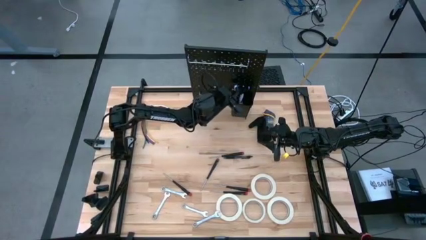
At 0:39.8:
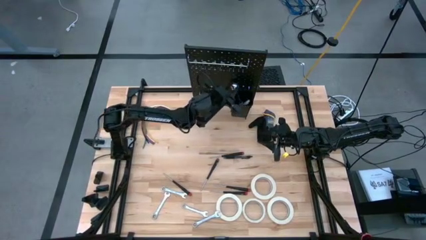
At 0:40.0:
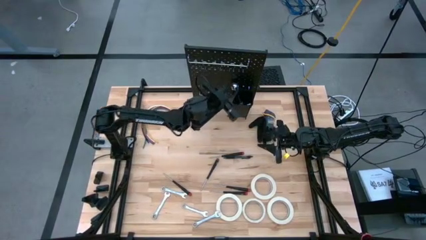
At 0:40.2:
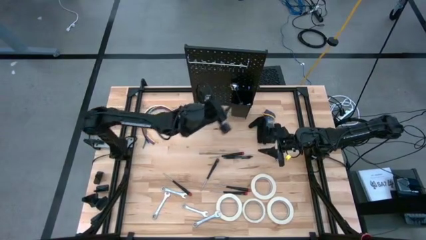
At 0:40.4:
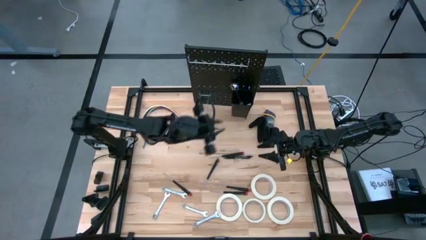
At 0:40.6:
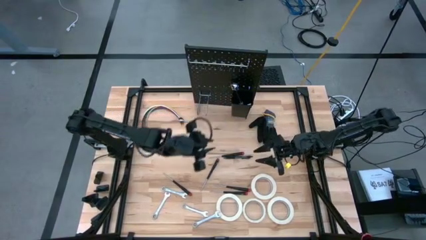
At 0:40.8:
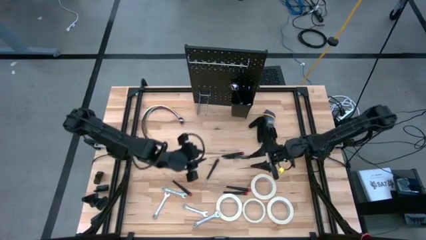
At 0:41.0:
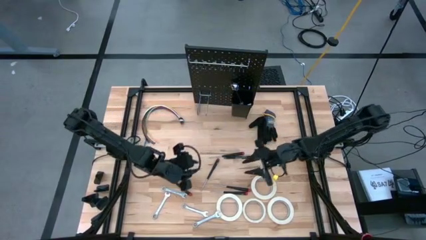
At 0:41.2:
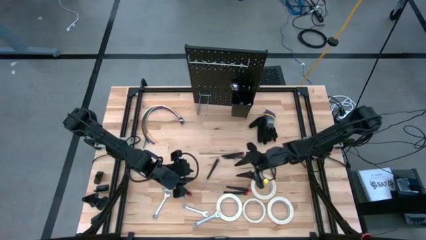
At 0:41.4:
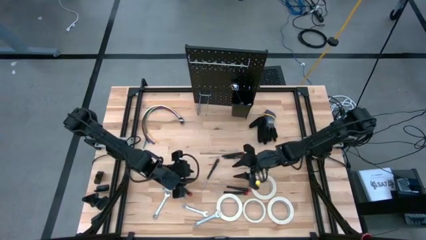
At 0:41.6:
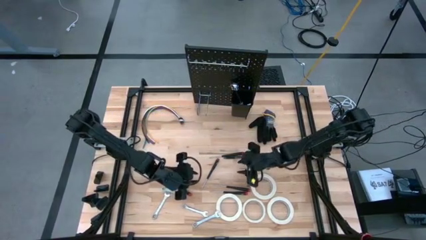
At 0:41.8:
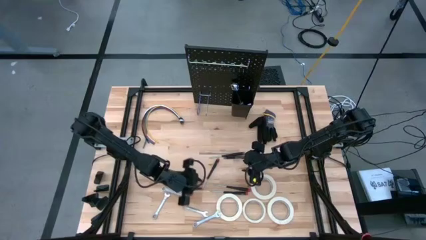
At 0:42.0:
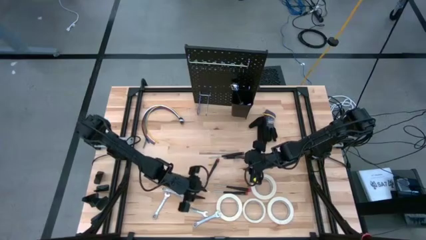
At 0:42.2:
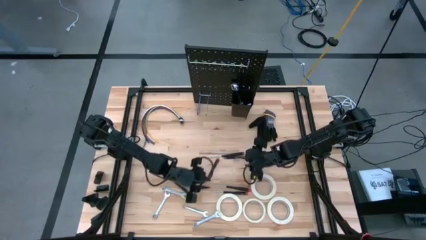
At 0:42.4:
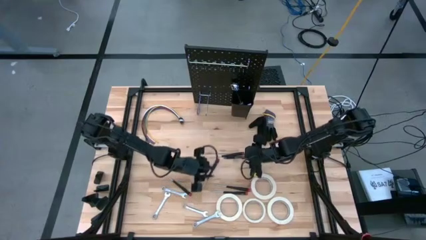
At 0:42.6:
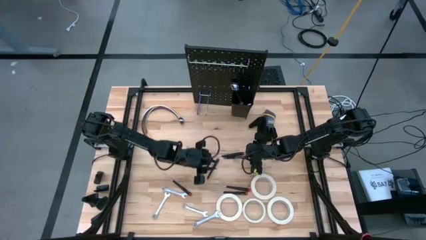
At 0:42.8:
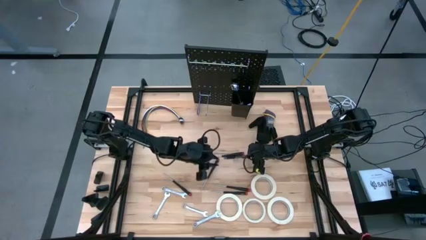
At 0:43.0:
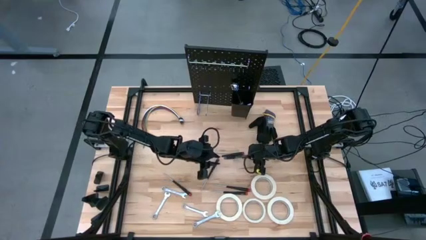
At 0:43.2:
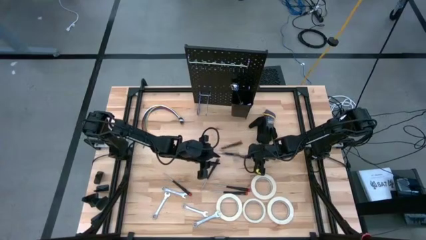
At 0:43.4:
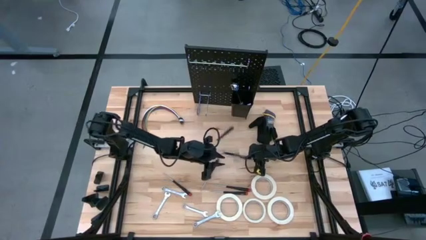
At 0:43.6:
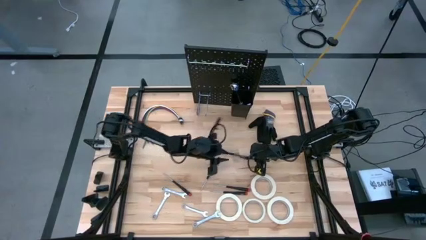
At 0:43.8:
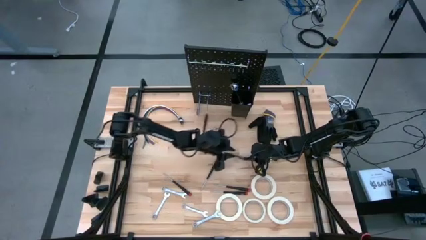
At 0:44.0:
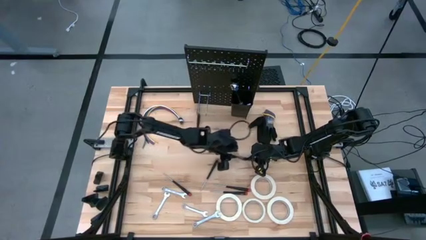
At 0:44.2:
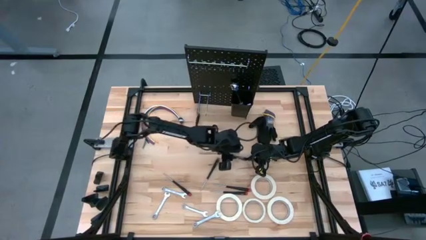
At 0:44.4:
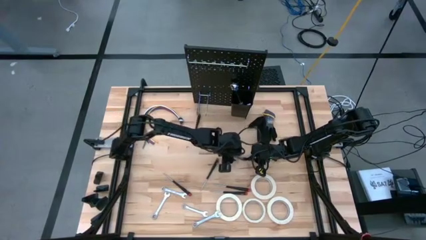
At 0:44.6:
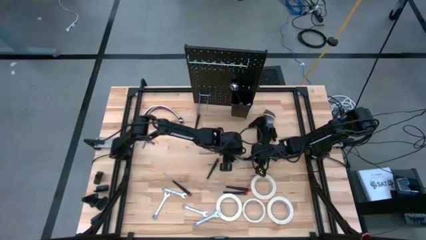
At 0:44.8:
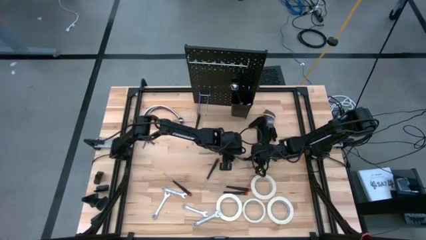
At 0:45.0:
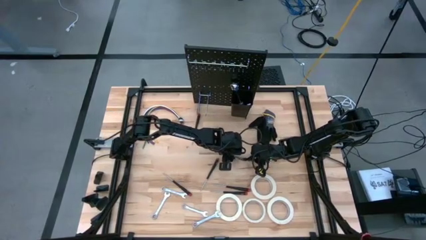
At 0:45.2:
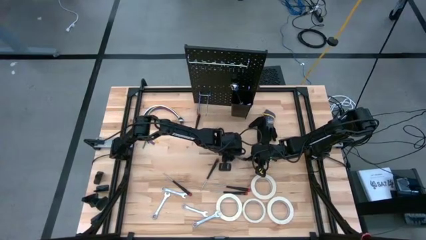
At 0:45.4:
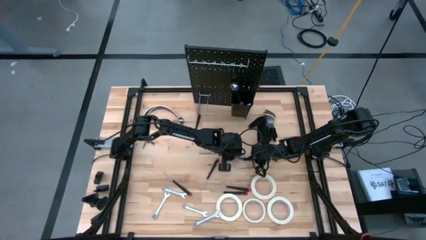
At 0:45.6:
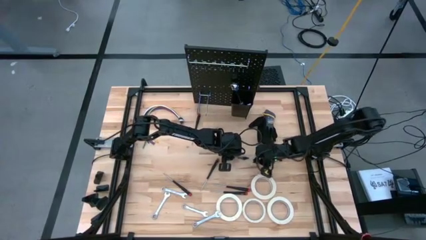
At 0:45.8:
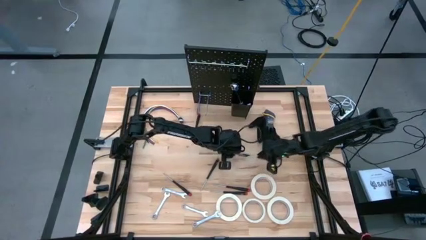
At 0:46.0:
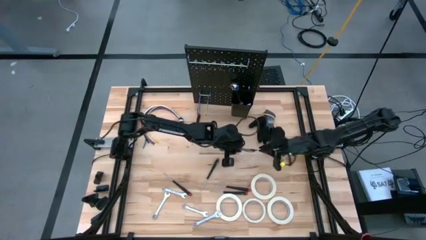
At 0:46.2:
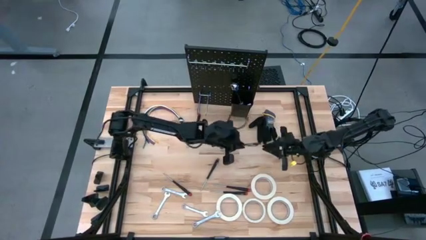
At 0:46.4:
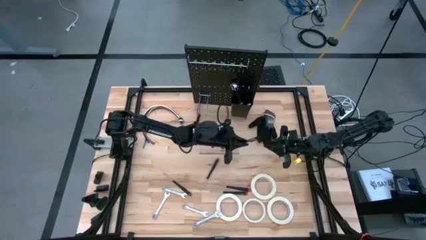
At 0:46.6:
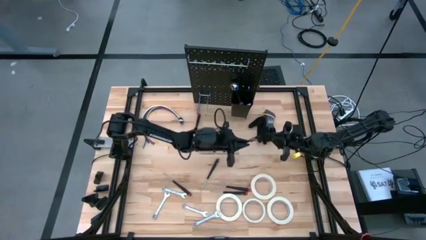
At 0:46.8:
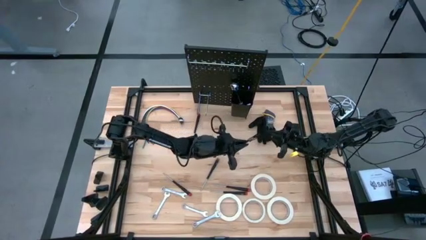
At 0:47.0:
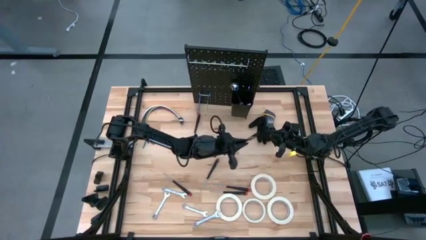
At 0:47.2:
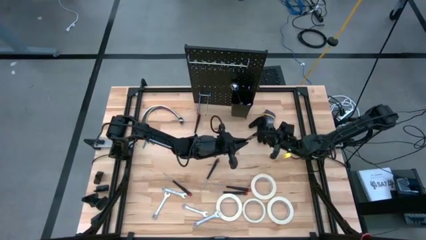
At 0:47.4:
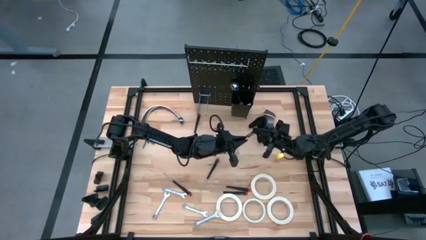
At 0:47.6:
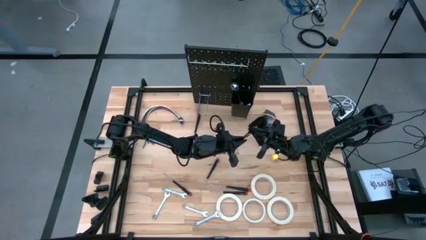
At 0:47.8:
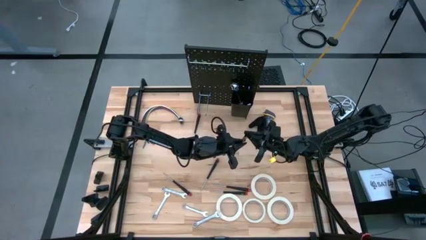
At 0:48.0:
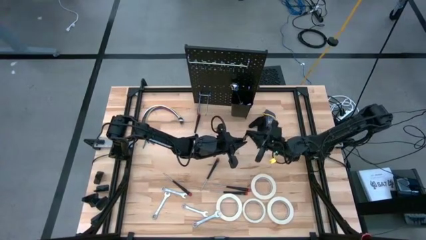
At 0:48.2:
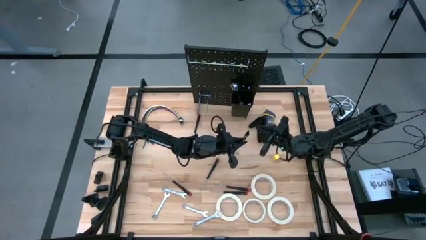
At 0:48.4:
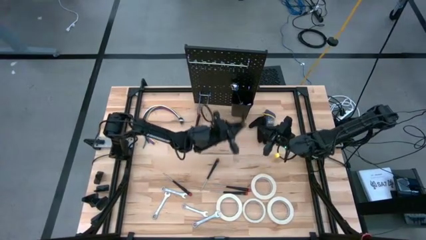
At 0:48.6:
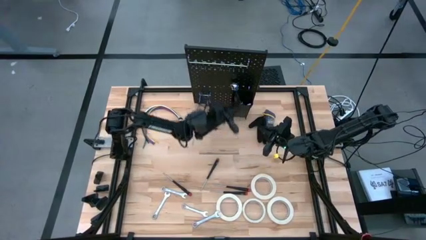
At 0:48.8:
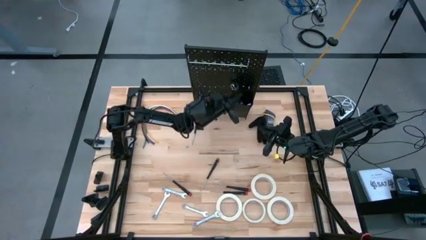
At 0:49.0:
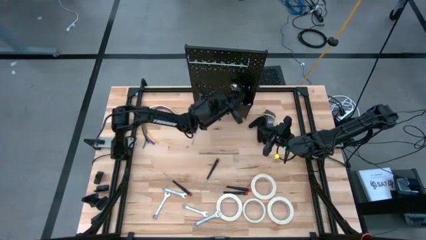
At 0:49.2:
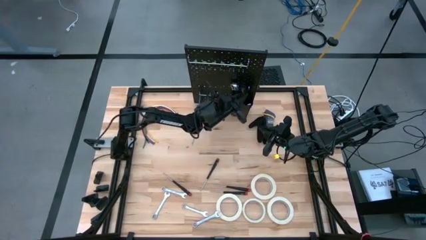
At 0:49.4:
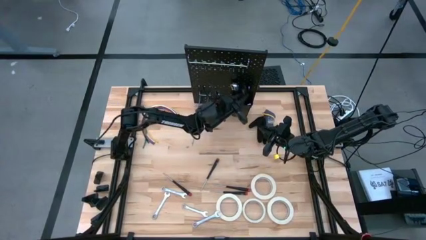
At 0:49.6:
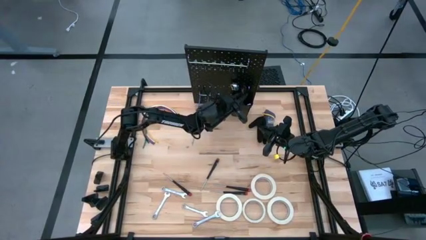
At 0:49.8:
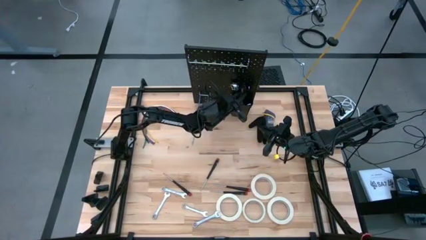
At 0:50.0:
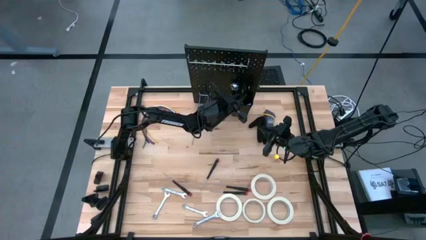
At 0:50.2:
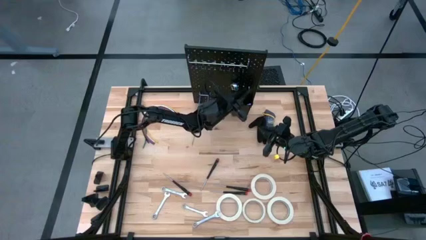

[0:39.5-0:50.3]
Task: Hang tools onto peg board
Put the black pen into the black bin on the peg board

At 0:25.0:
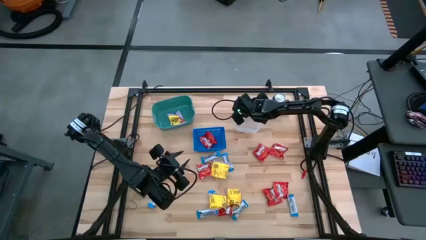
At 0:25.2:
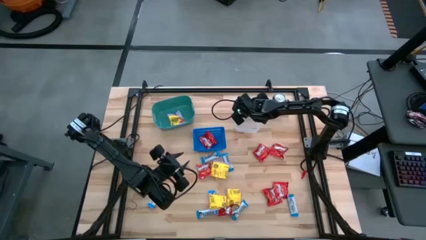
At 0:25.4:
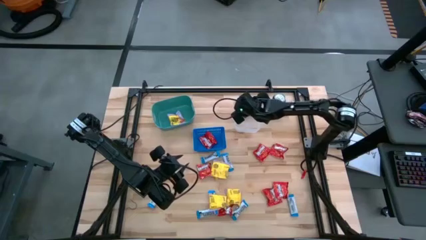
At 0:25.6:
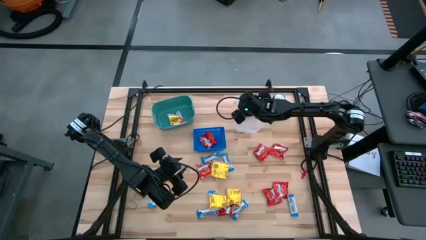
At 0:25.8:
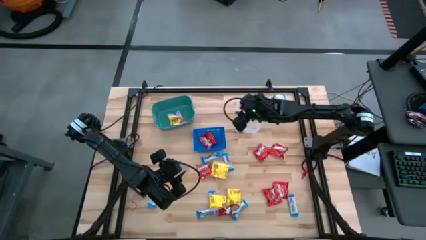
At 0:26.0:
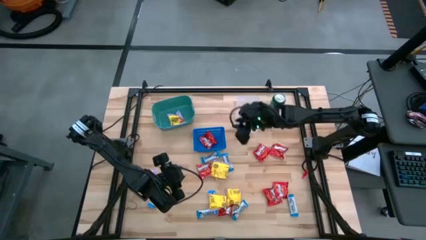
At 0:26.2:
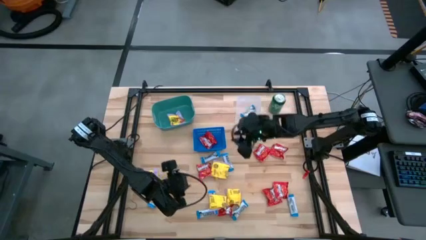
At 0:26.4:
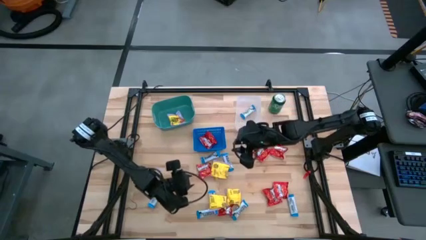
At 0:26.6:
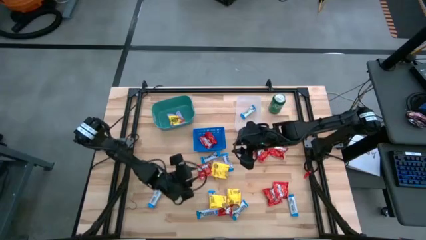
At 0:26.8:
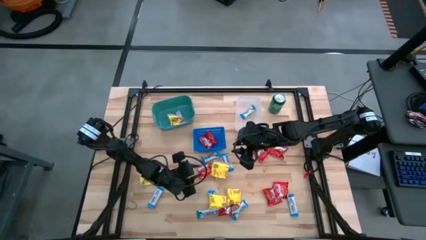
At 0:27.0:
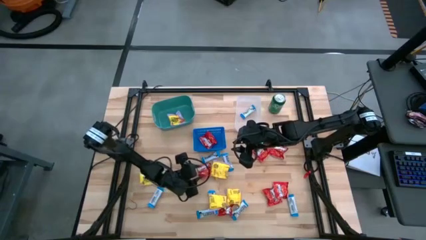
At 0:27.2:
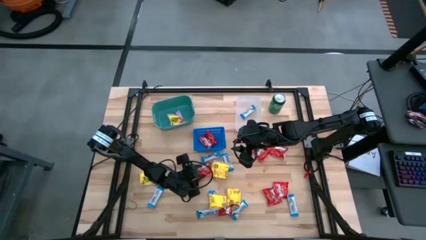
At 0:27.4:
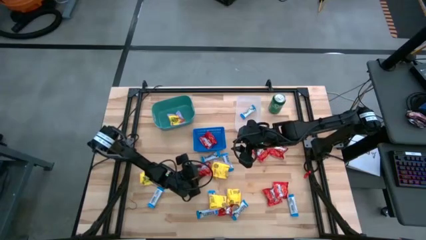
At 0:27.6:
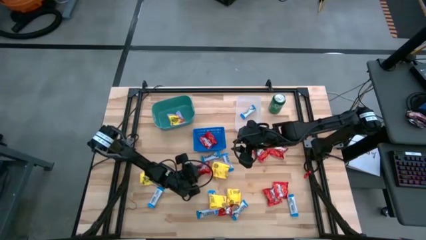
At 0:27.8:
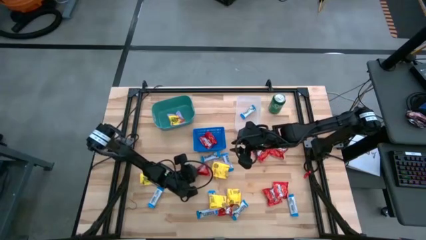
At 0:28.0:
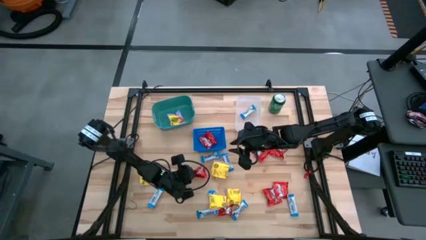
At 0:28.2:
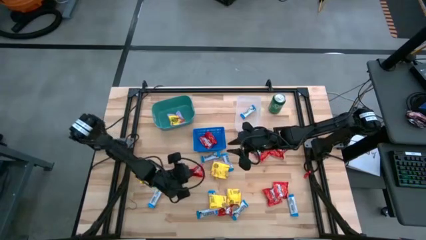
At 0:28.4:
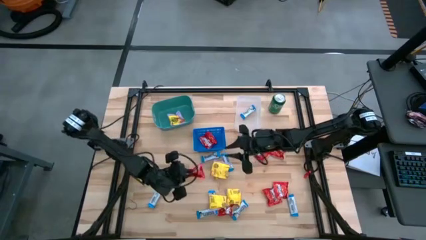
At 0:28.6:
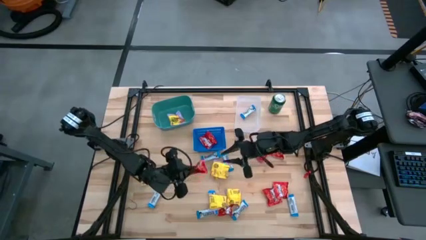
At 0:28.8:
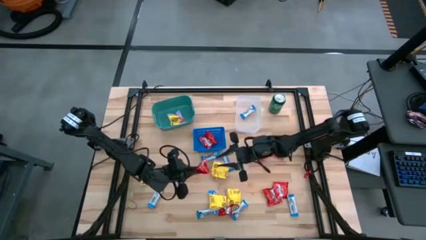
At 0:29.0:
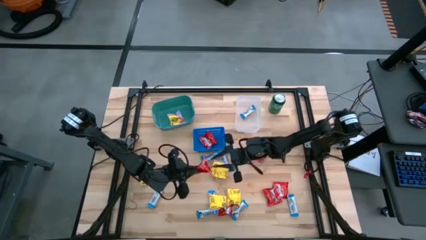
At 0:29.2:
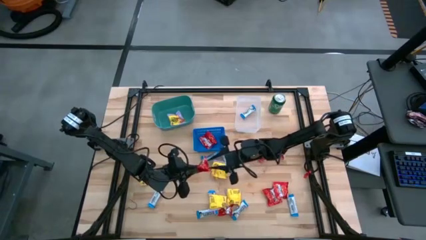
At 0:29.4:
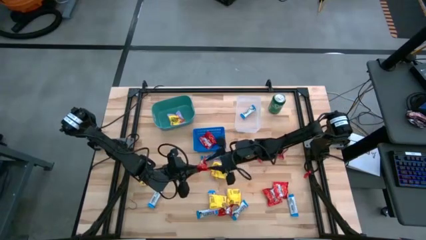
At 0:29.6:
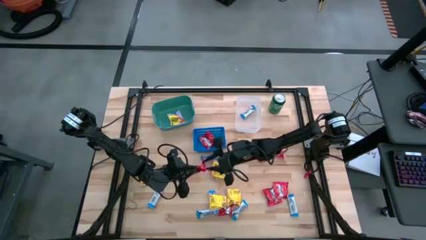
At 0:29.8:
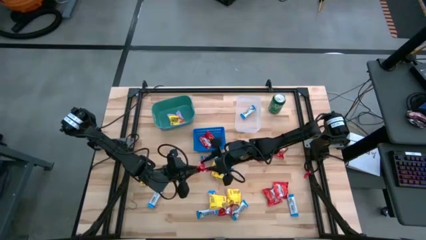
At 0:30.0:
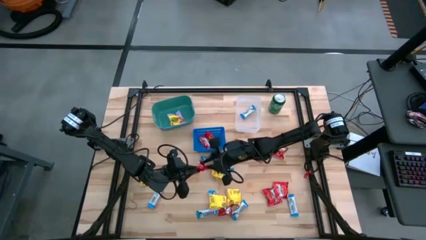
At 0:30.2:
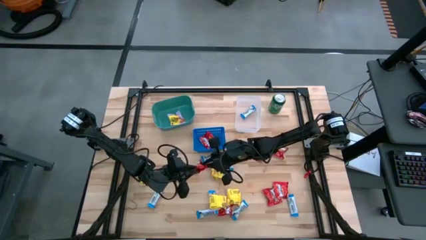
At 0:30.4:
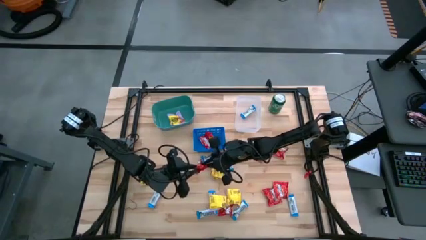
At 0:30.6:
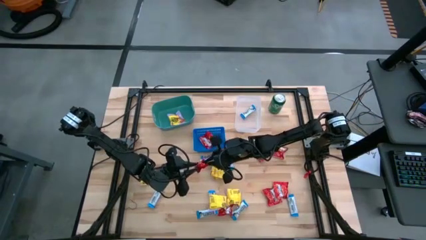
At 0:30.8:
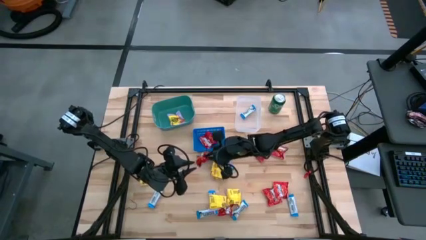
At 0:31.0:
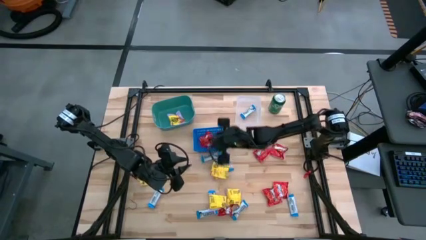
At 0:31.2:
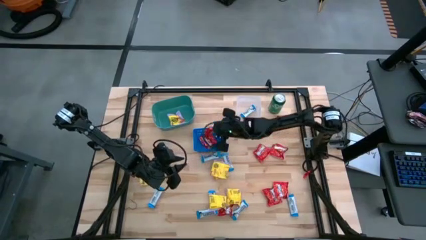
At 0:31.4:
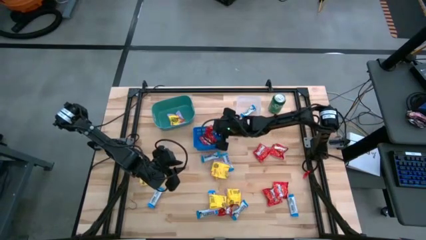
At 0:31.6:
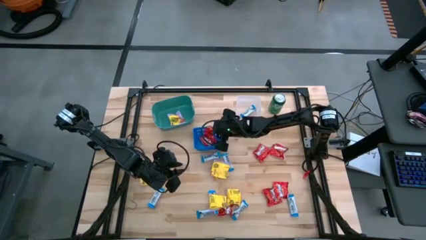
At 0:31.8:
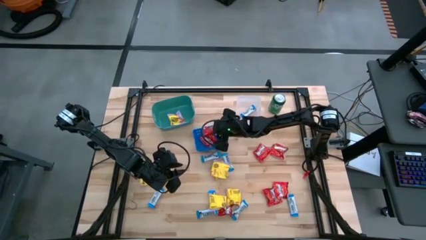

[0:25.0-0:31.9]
Task: Sort candy
Put the hersheys bar into the transparent bin
